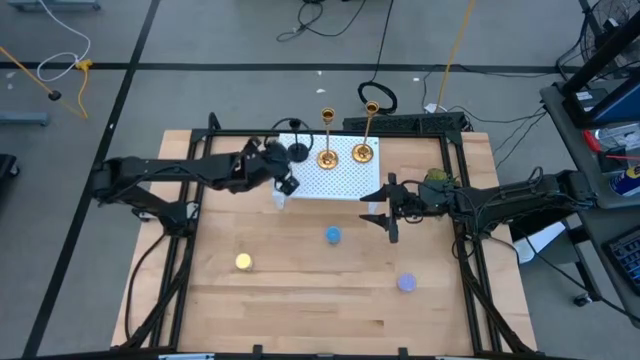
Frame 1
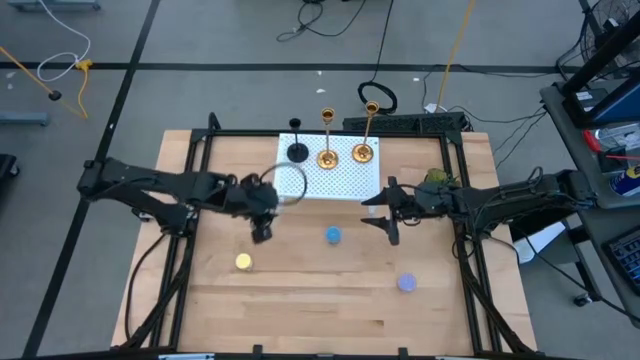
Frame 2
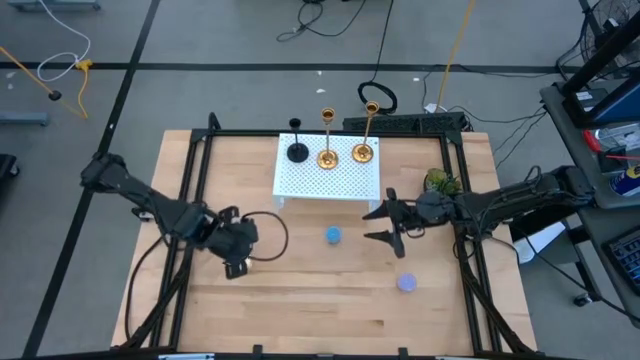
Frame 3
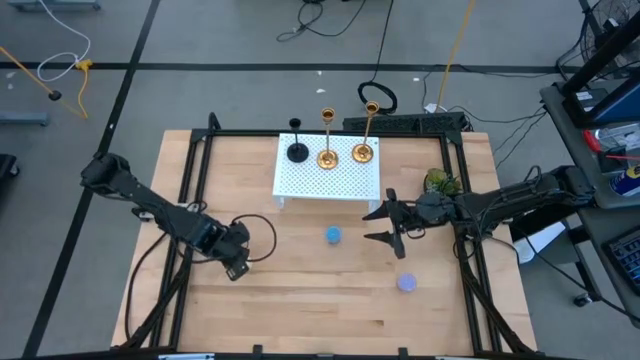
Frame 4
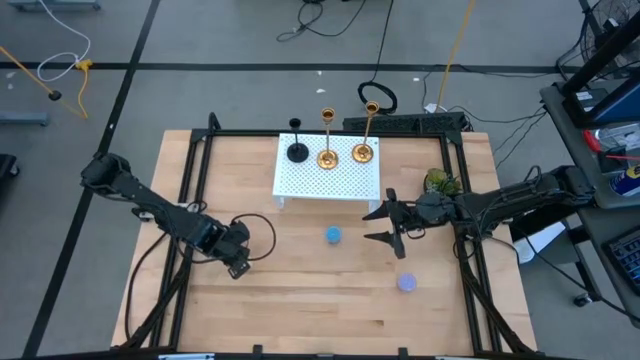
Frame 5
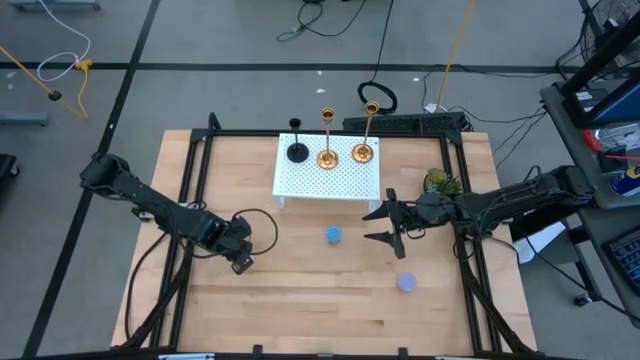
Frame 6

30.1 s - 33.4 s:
Task: Pick & Place candle stick holders
Put the yellow scented candle on the shelf

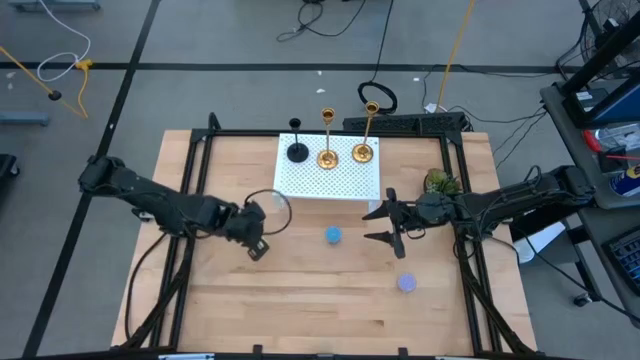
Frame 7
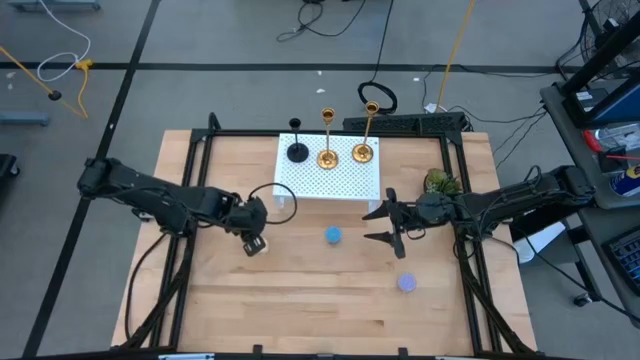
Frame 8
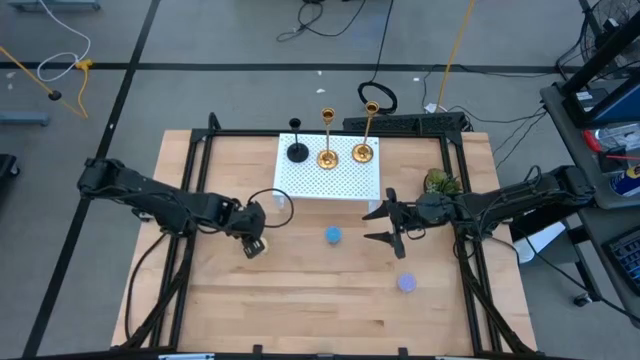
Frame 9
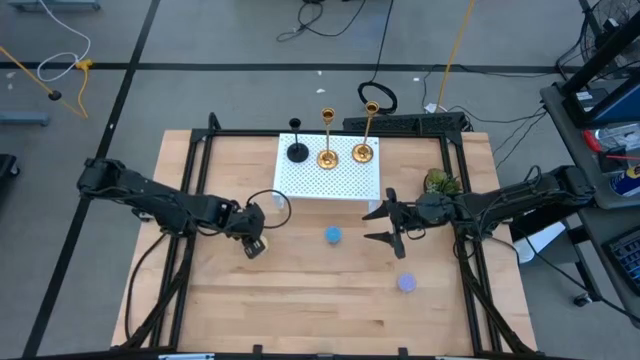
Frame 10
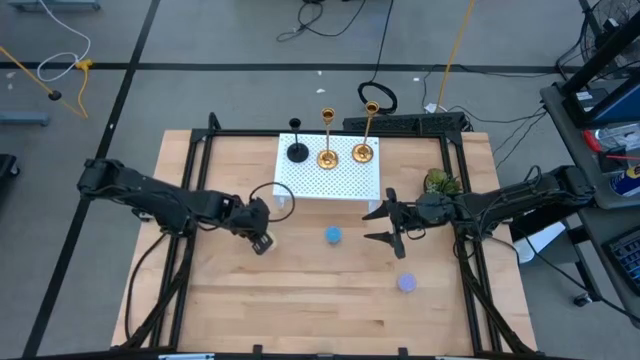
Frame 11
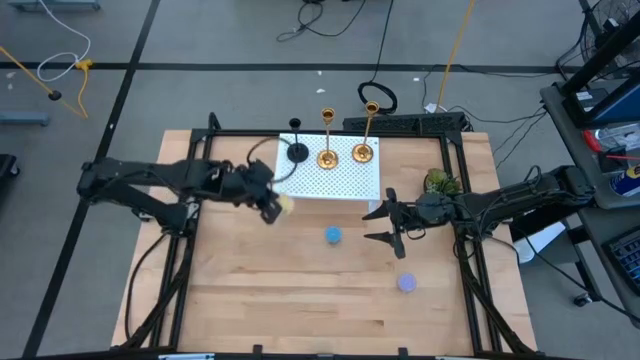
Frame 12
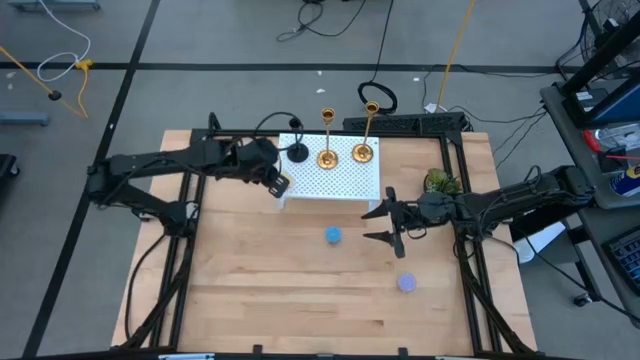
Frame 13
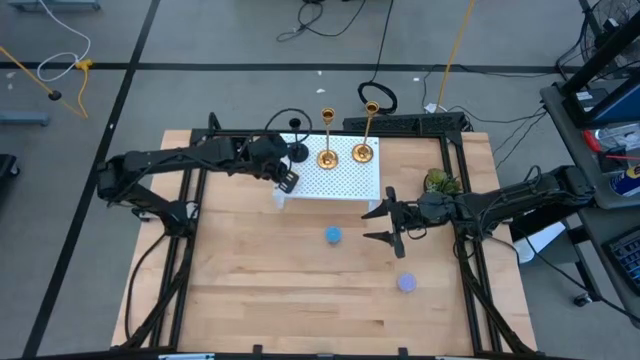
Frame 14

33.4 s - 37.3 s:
Put the yellow scented candle on the shelf

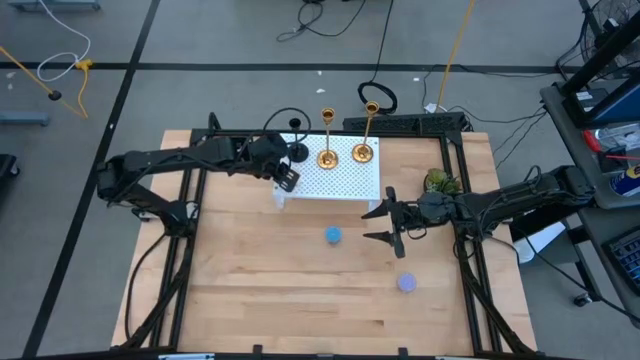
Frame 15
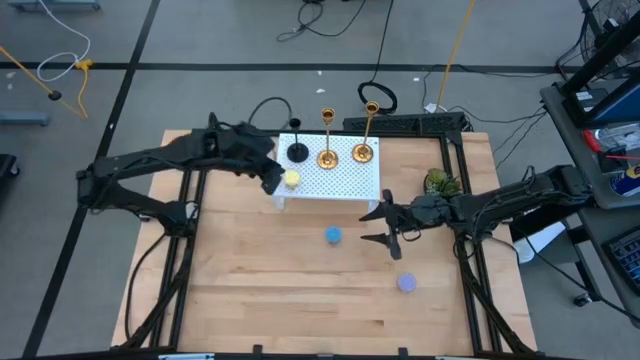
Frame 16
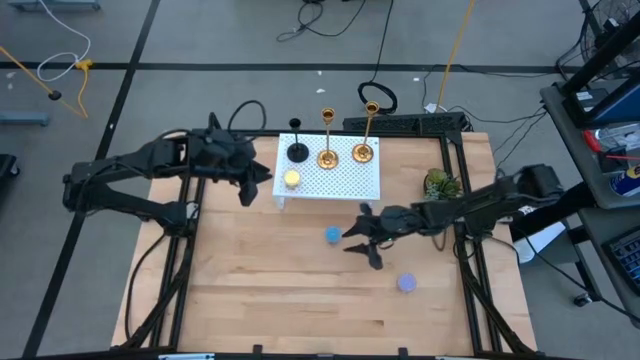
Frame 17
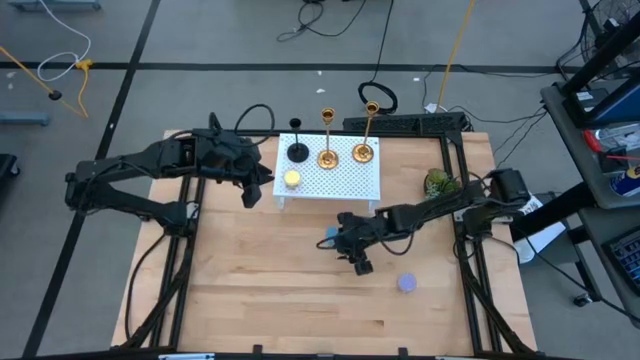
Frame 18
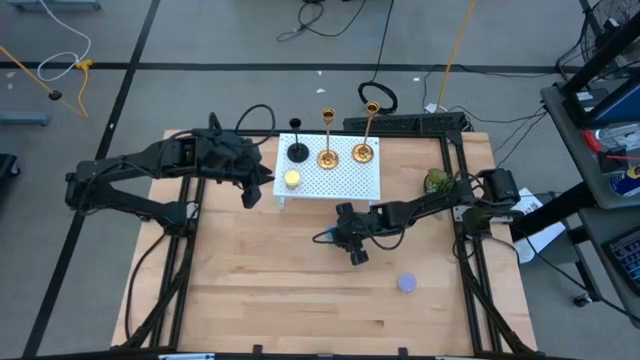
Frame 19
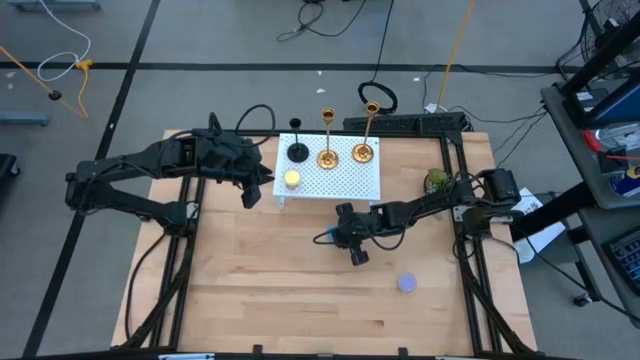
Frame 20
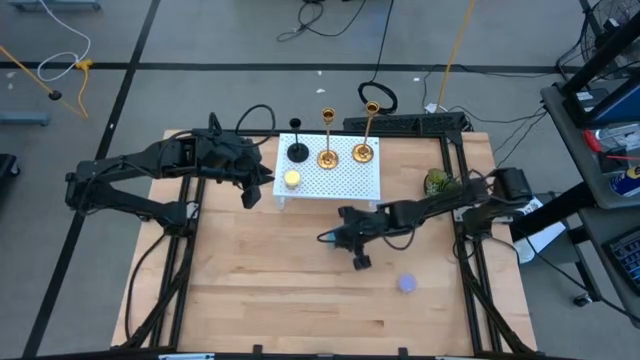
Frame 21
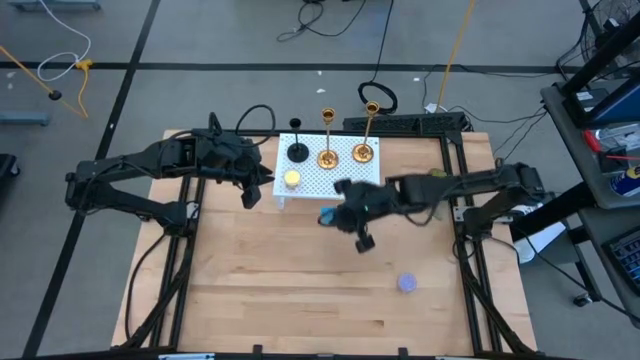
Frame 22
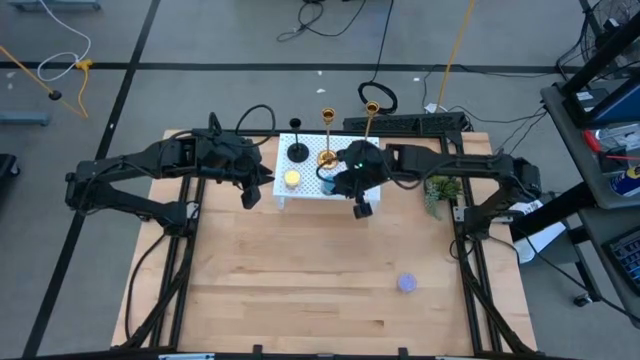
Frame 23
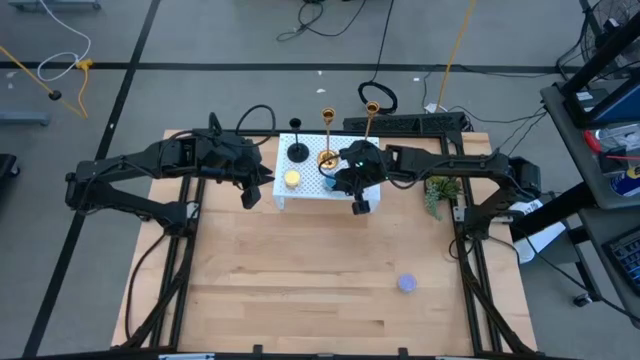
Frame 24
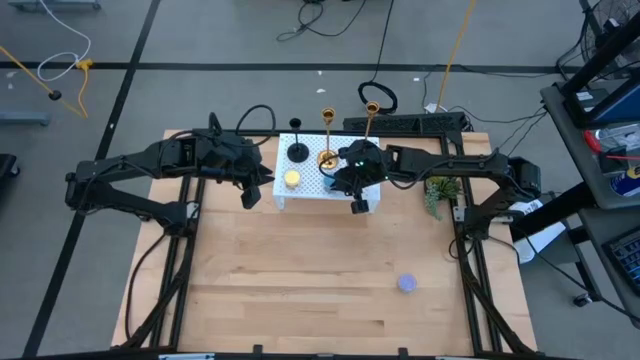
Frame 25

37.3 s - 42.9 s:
Put the blue scented candle on the shelf

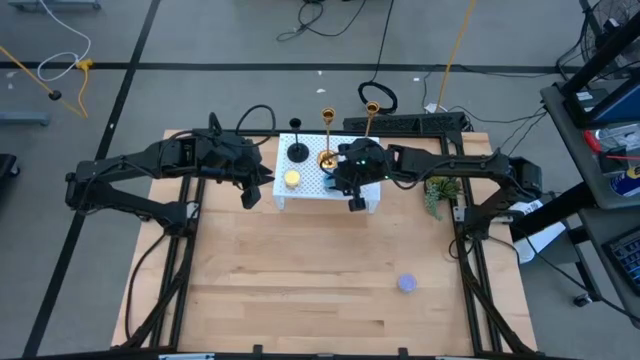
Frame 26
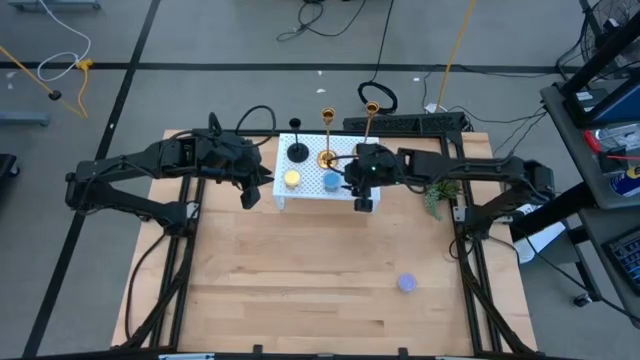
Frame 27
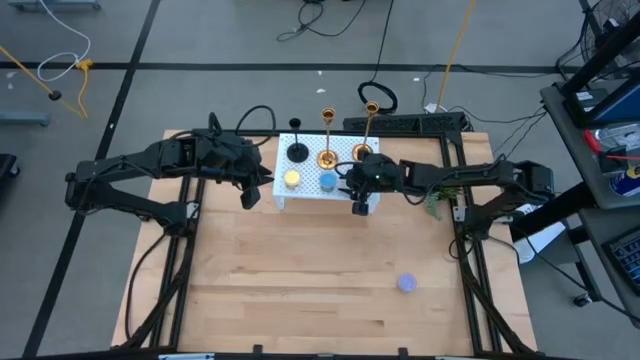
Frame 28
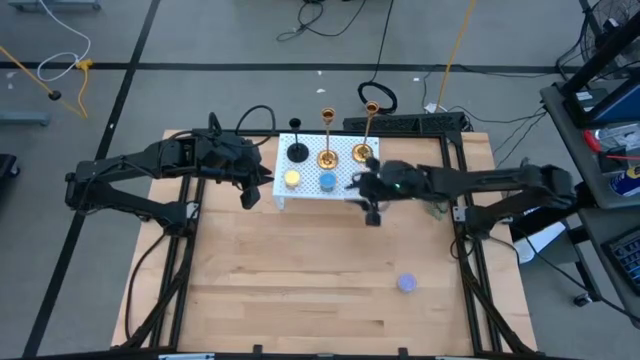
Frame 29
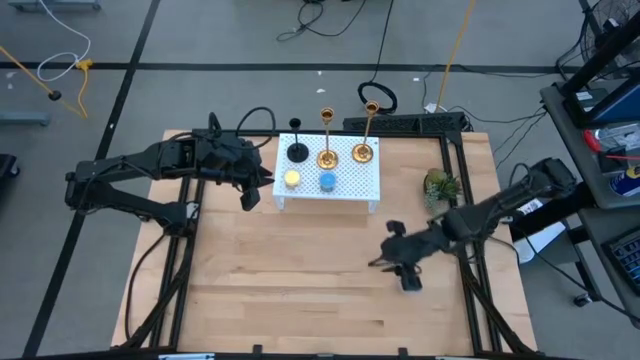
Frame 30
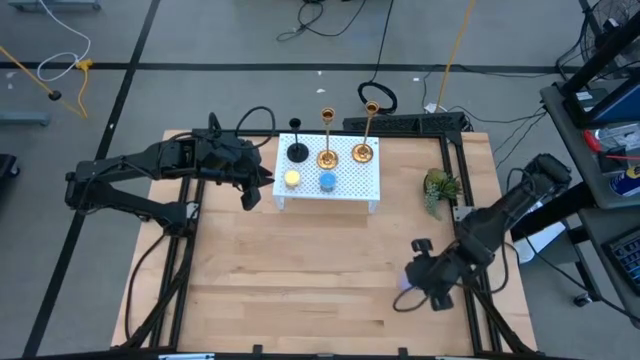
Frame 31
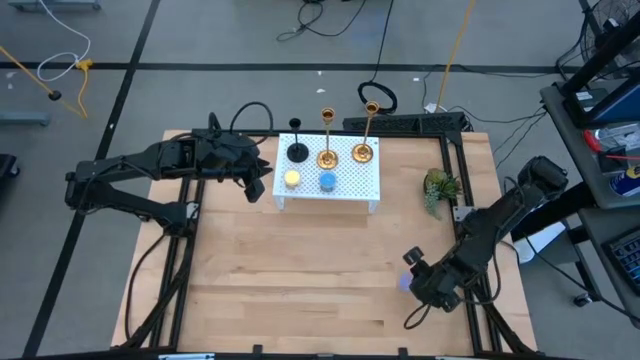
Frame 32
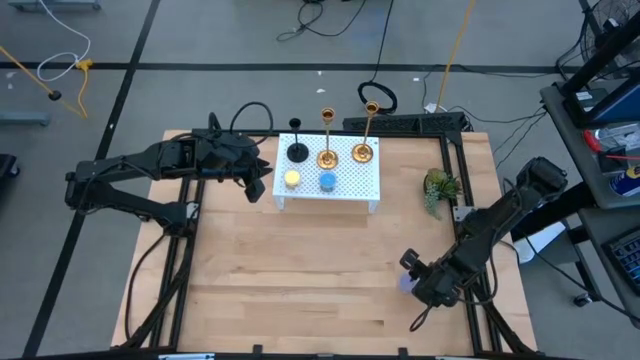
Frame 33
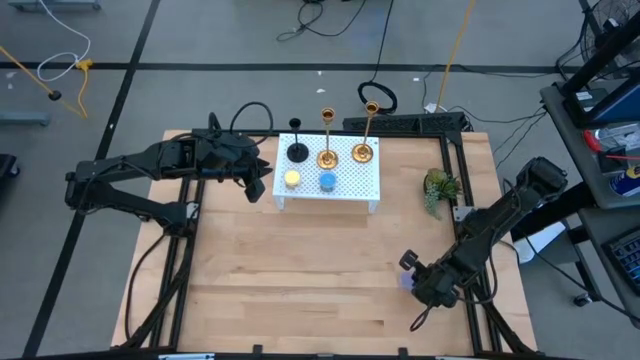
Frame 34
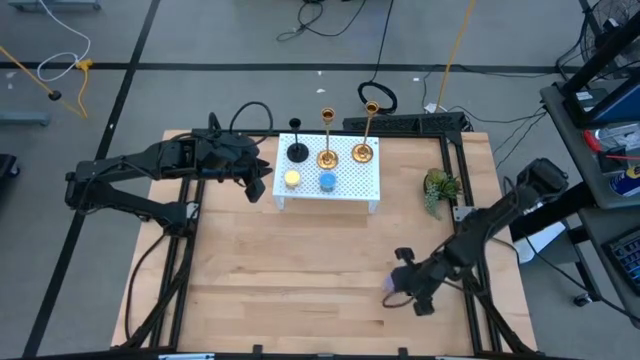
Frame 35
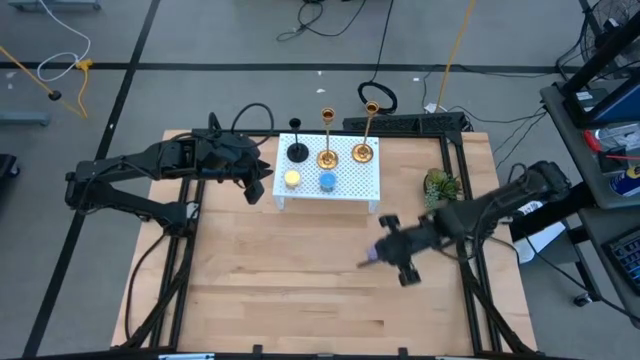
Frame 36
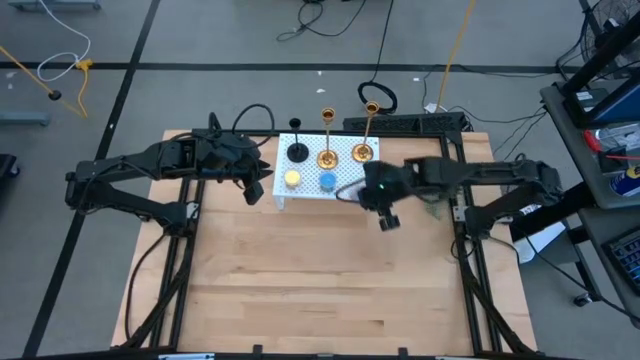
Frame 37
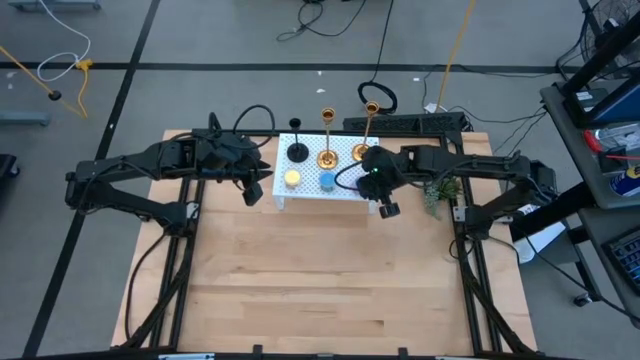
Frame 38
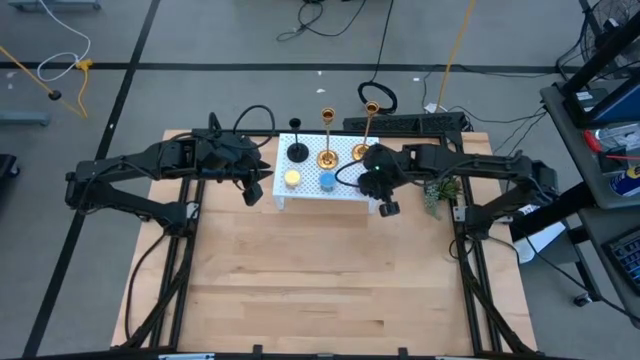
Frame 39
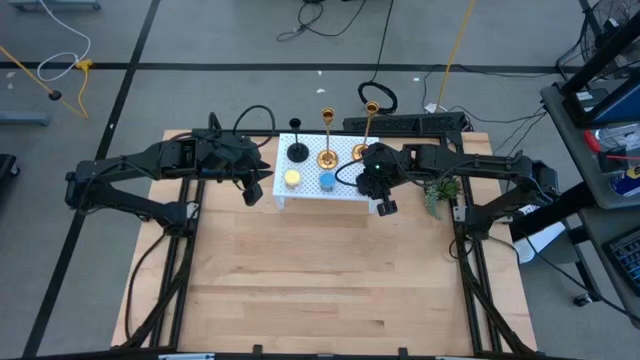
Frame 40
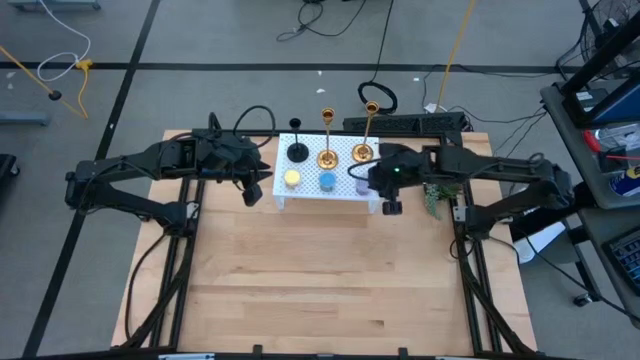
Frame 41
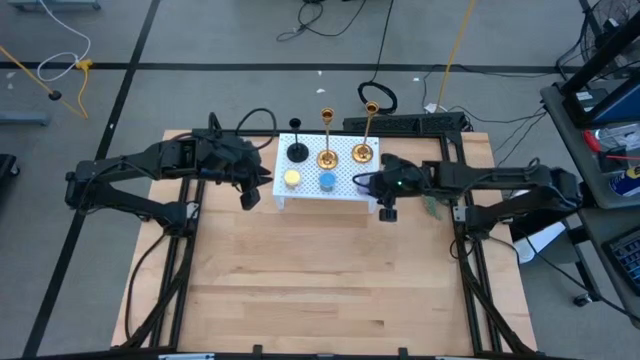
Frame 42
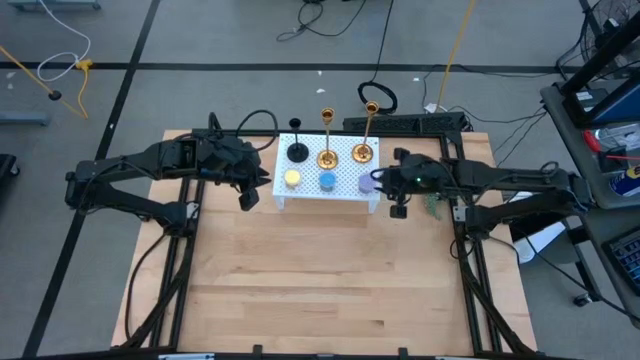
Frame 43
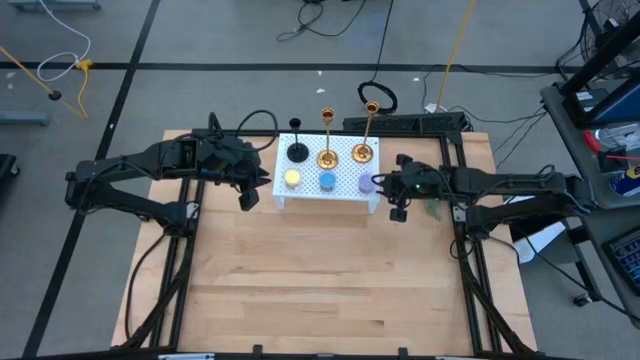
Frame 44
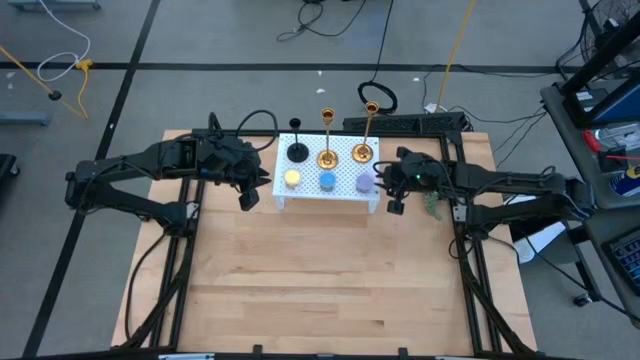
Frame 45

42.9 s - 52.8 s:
Put the purple scented candle on the shelf
